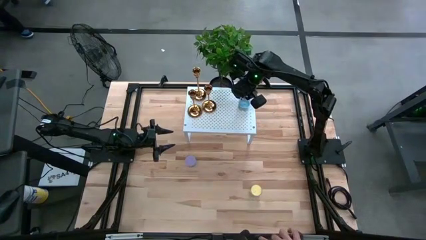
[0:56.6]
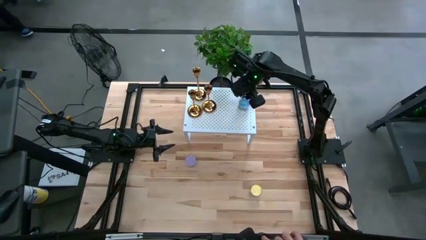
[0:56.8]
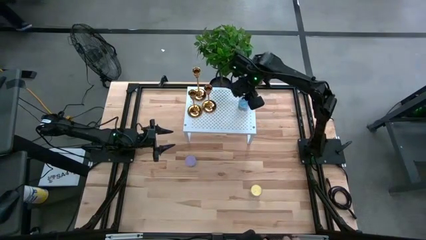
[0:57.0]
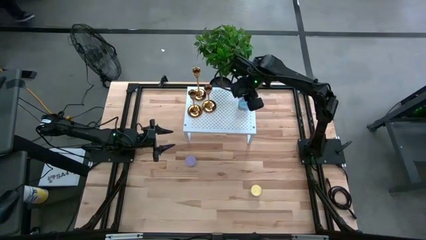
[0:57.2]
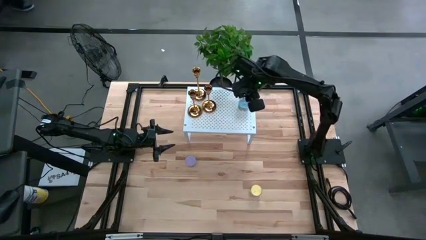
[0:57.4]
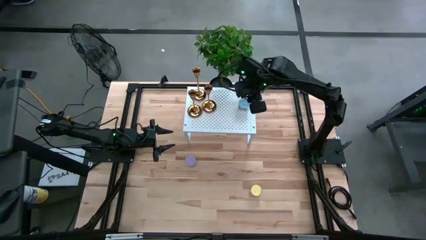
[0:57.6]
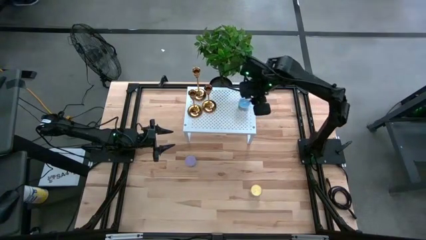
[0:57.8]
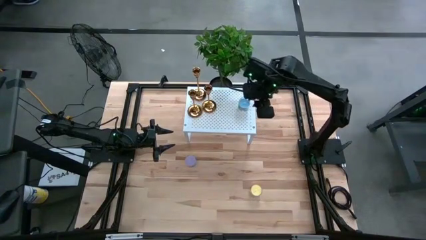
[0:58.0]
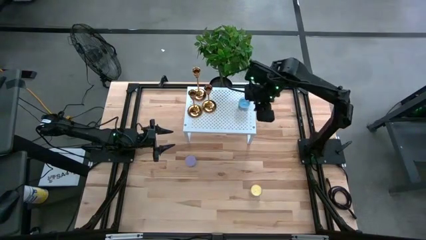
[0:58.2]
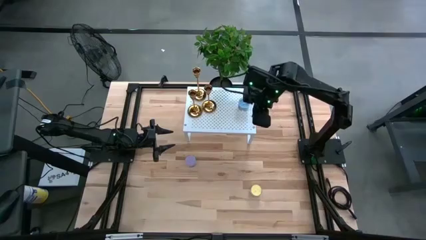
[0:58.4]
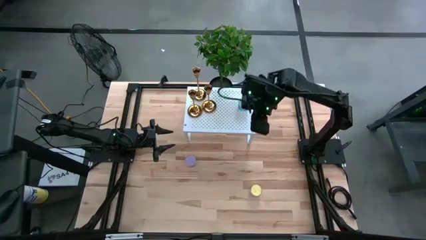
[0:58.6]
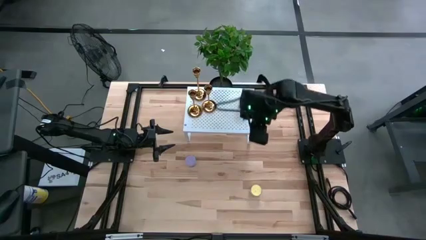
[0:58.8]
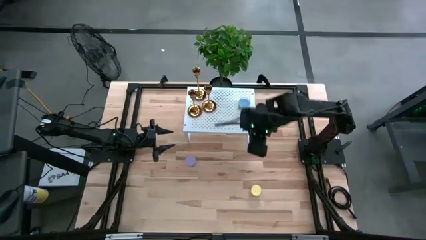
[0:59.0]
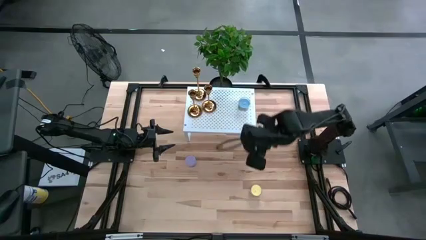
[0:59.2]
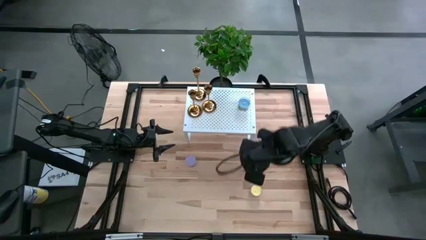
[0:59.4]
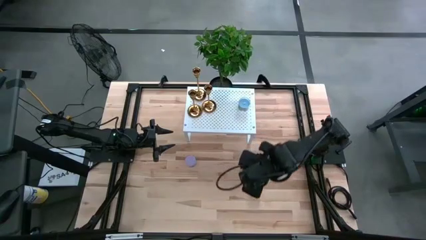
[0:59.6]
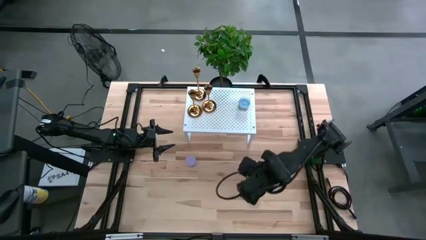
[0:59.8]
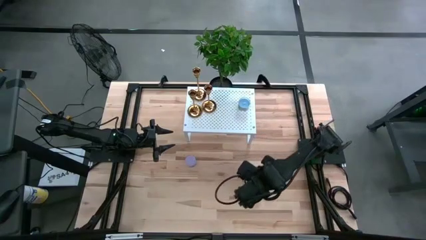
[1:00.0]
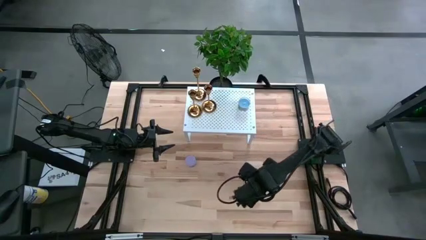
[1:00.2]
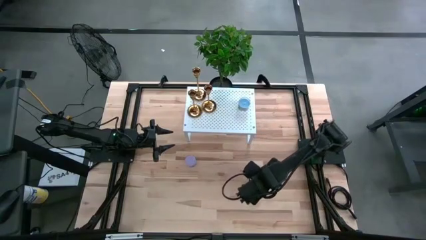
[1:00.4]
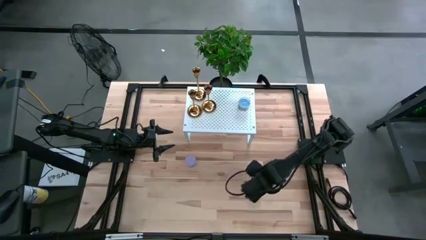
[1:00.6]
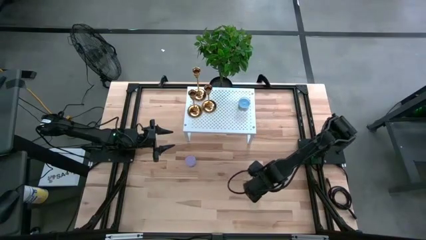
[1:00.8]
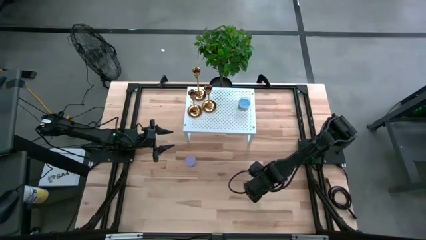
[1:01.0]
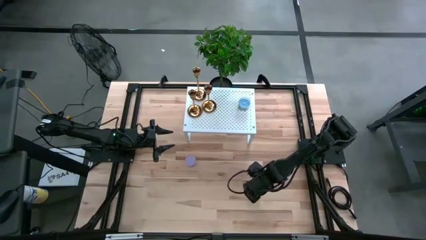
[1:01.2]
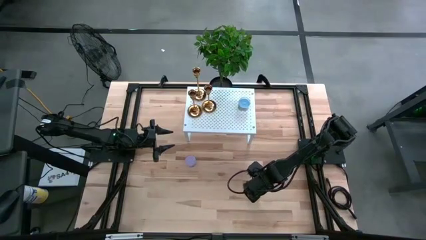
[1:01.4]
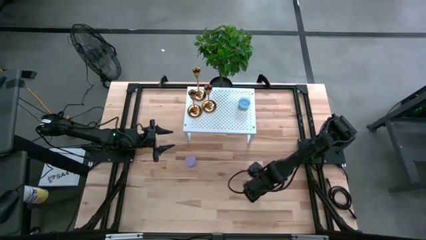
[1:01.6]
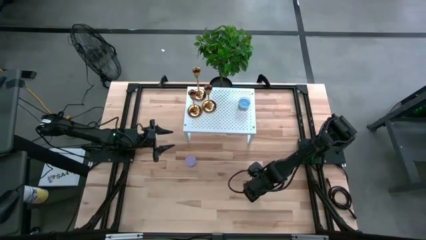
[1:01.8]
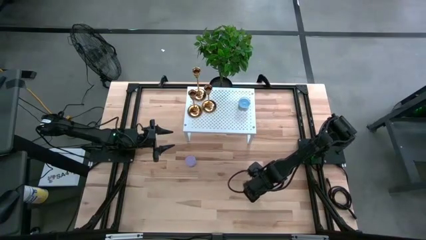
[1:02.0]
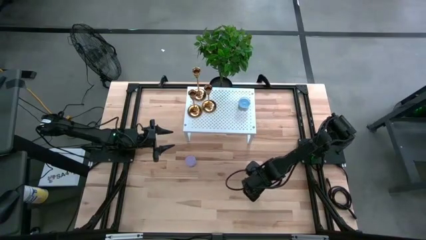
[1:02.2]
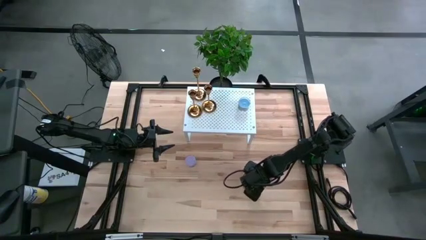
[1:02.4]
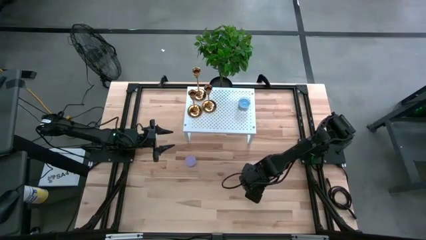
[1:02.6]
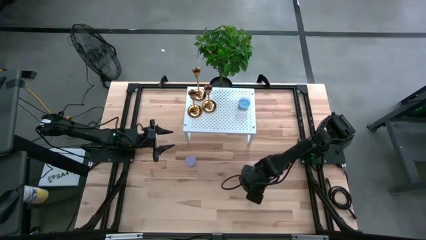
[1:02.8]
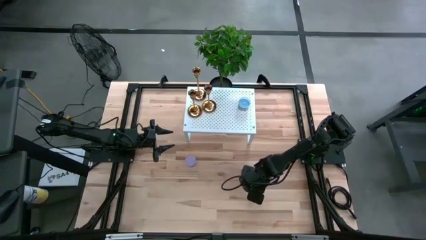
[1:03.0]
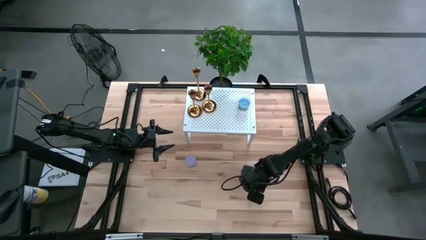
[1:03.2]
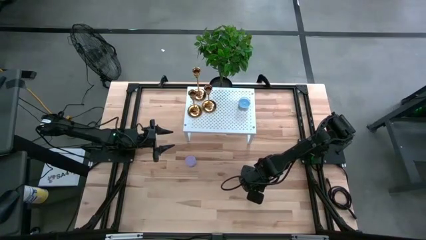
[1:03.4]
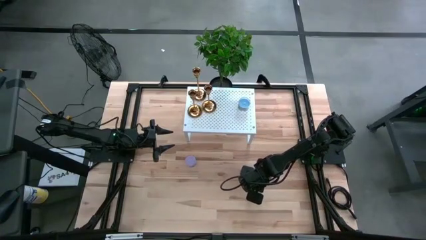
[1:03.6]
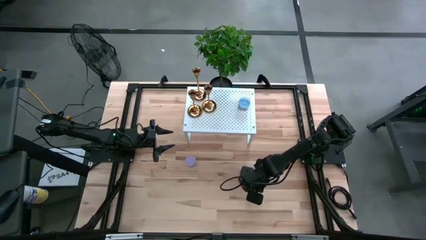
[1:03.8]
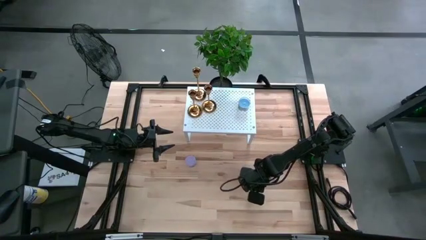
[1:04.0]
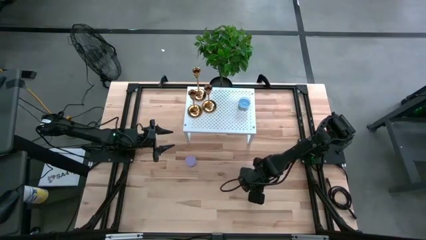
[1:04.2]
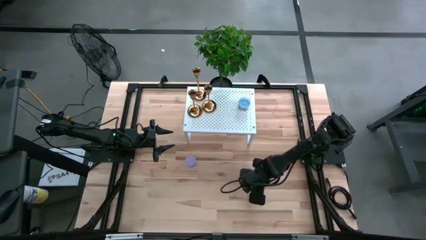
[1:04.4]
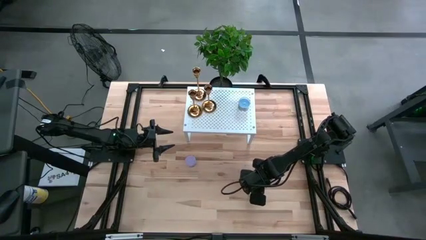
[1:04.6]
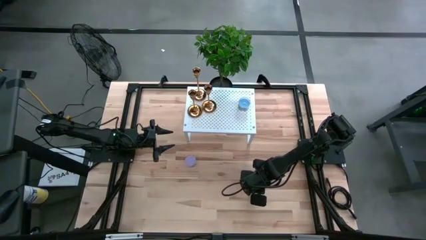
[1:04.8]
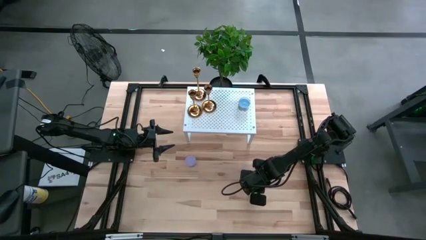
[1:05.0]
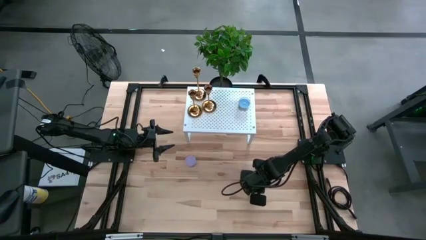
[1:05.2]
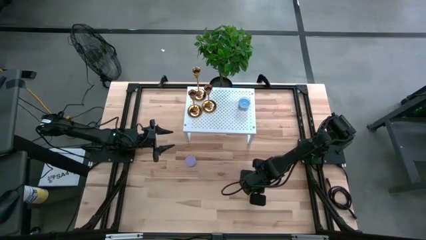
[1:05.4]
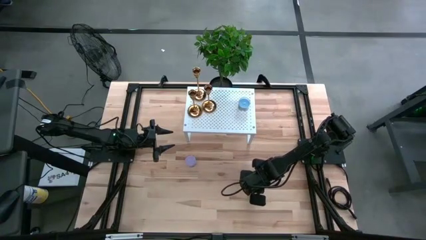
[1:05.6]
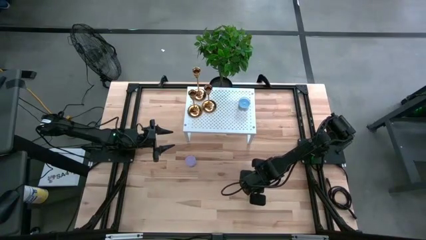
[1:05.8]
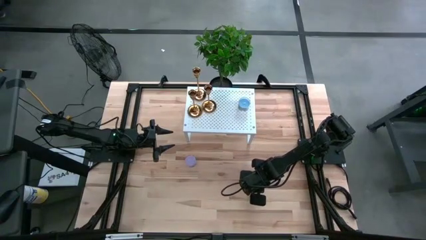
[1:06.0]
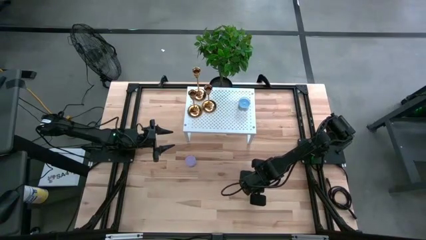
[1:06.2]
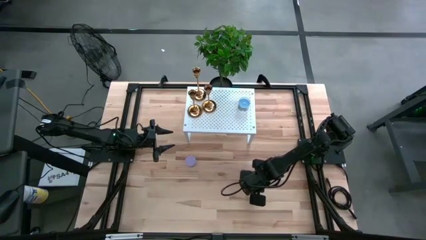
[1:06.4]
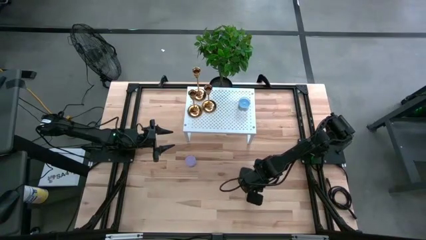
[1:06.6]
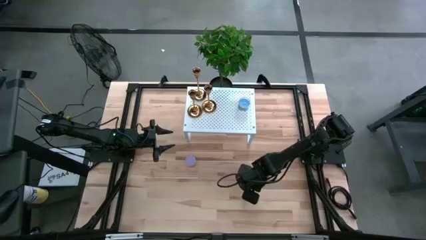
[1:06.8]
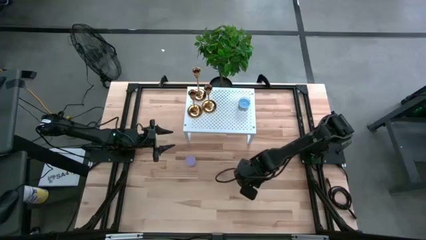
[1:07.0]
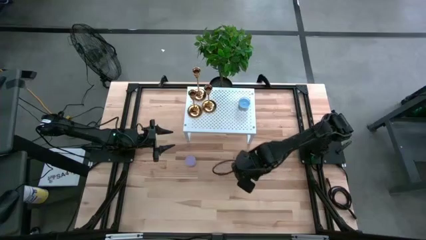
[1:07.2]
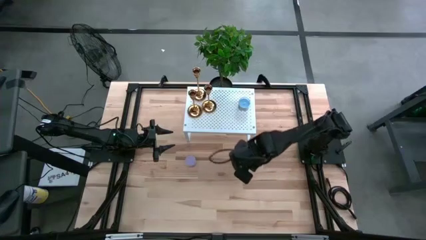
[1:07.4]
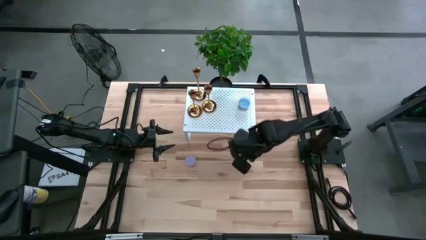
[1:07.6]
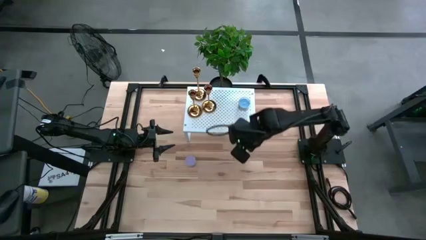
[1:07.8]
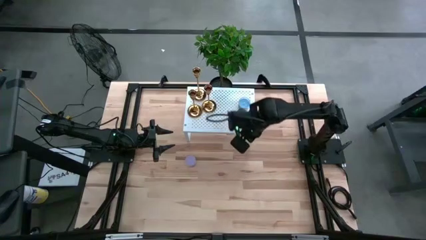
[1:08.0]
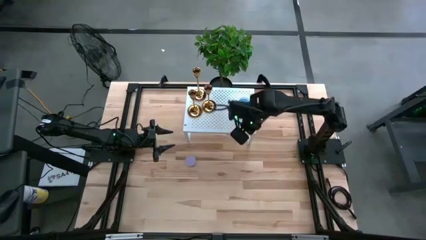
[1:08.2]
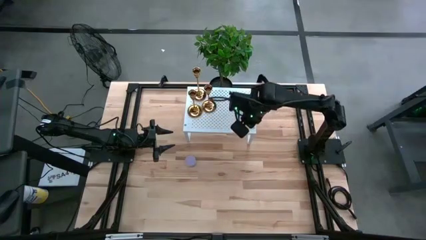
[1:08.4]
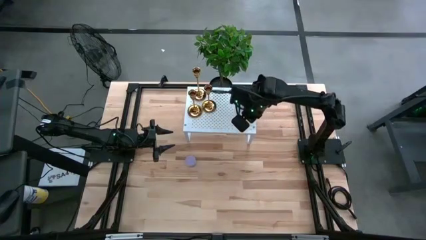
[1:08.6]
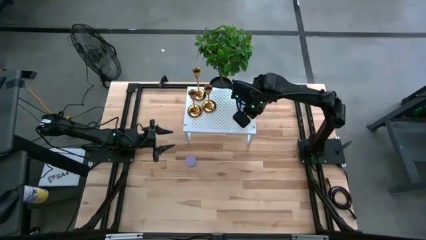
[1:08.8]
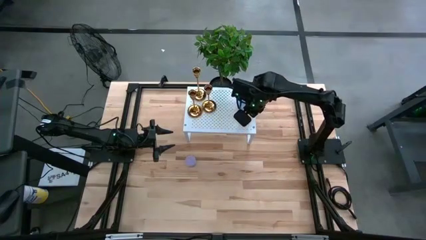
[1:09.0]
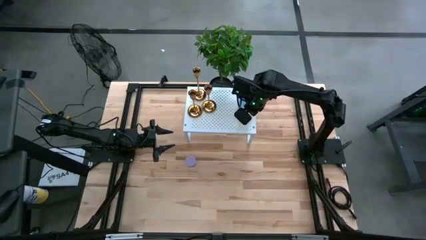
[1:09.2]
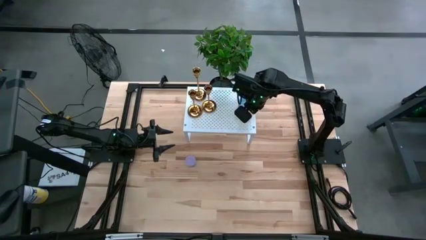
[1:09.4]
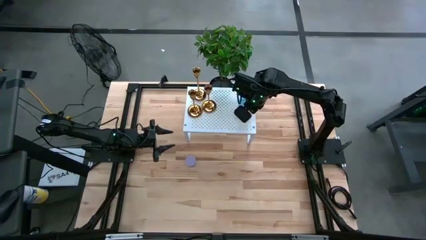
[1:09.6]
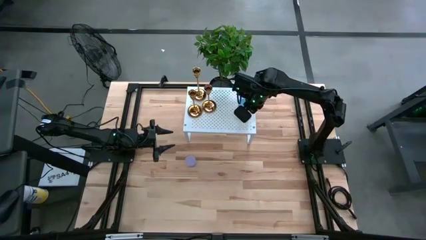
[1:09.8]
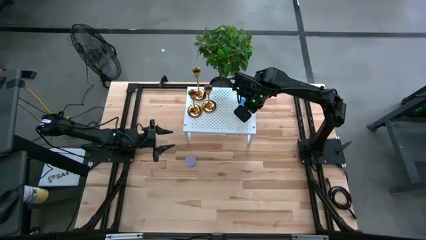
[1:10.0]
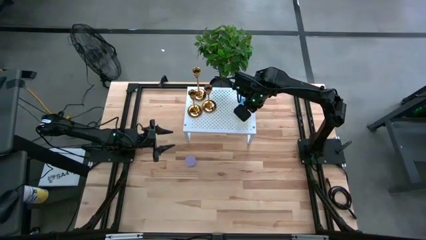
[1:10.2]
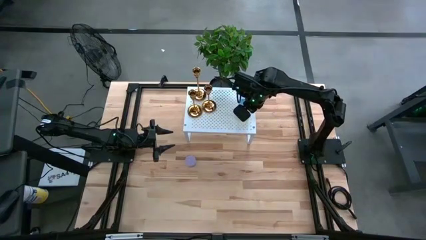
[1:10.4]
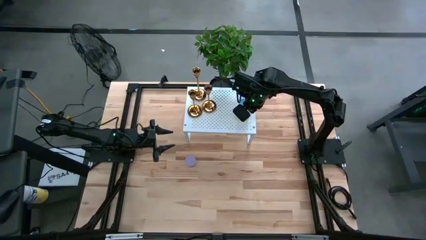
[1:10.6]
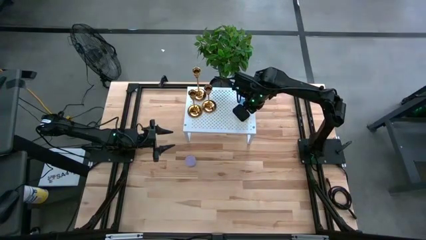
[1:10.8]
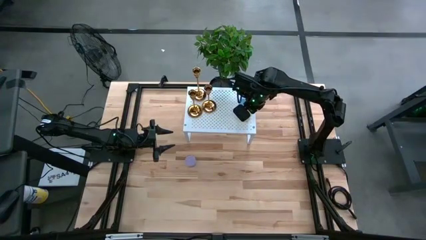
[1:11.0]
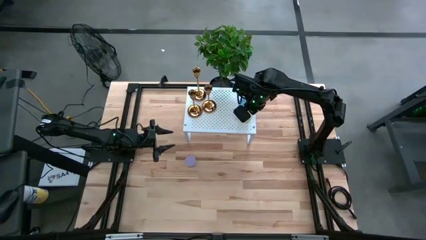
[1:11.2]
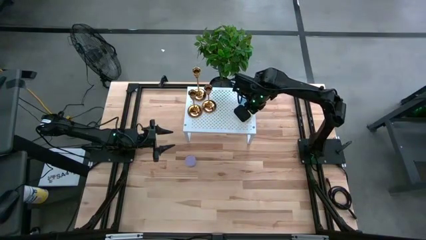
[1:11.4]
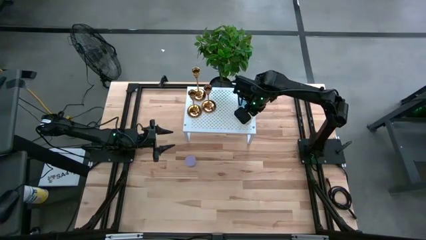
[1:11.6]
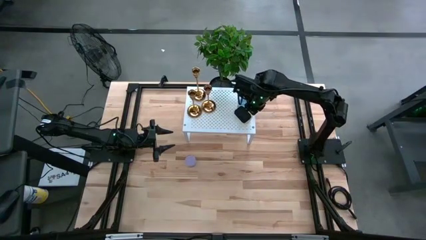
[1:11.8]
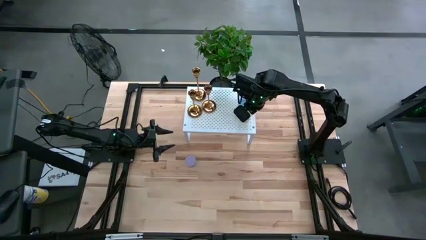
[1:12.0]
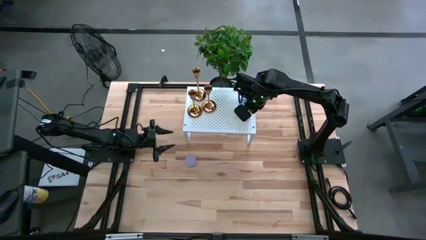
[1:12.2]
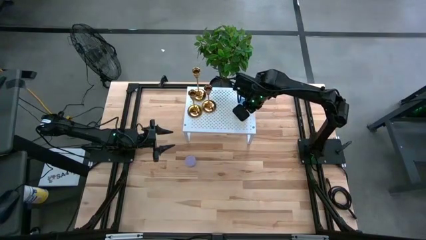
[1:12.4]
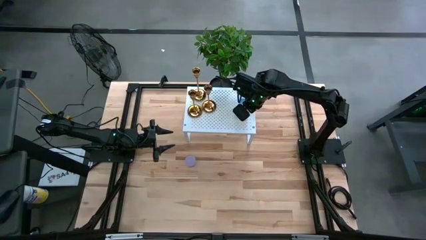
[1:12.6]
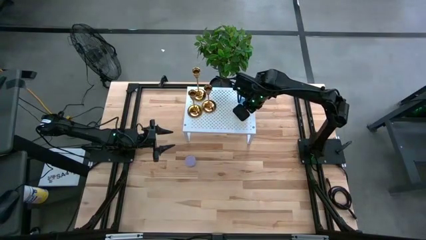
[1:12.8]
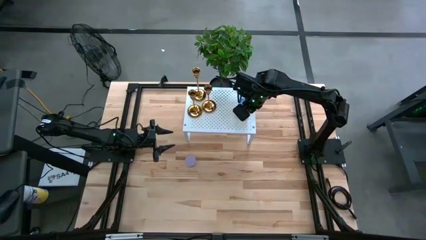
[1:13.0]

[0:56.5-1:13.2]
Task: Pick & Place candle stick holders
Put the yellow scented candle on the shelf
